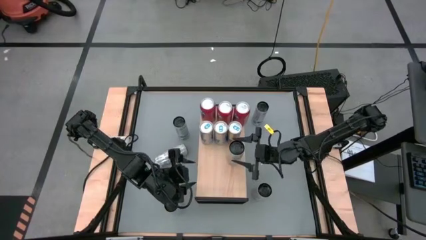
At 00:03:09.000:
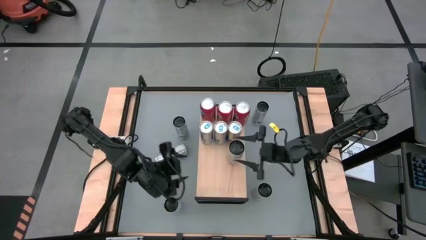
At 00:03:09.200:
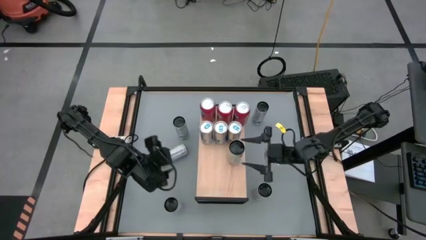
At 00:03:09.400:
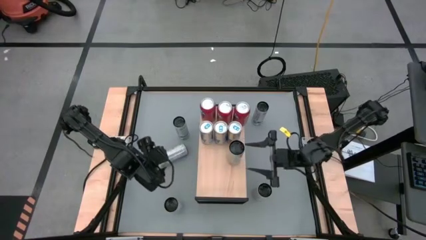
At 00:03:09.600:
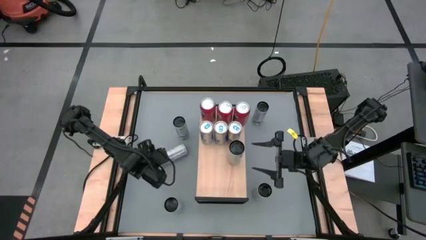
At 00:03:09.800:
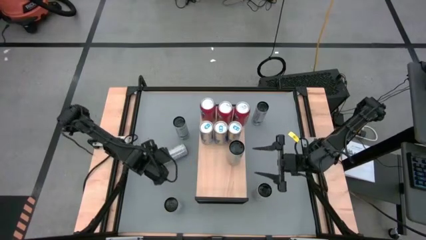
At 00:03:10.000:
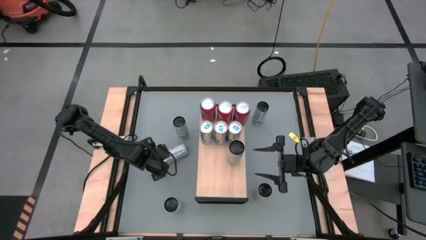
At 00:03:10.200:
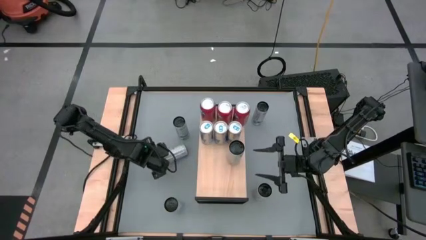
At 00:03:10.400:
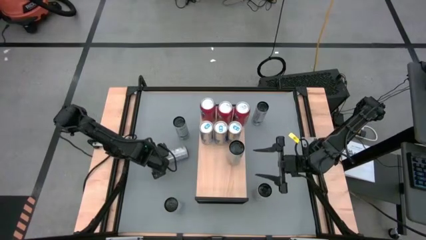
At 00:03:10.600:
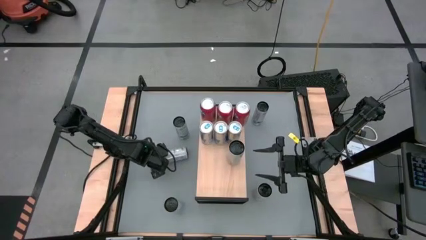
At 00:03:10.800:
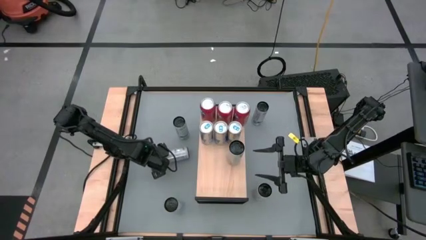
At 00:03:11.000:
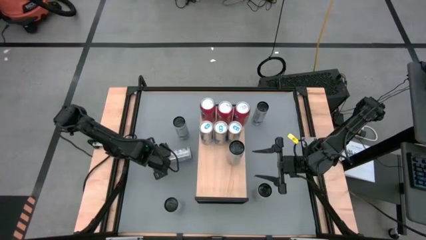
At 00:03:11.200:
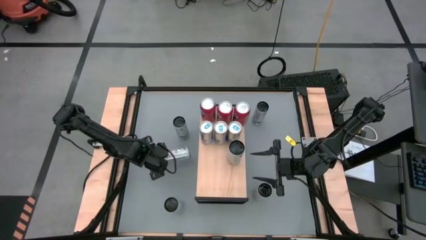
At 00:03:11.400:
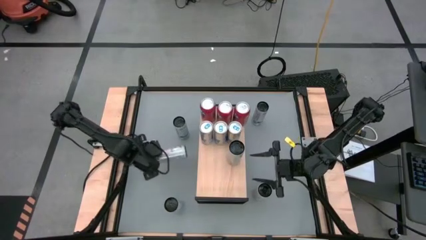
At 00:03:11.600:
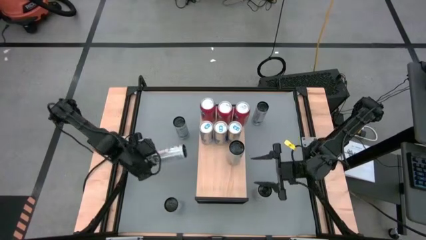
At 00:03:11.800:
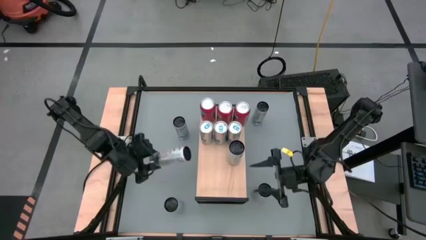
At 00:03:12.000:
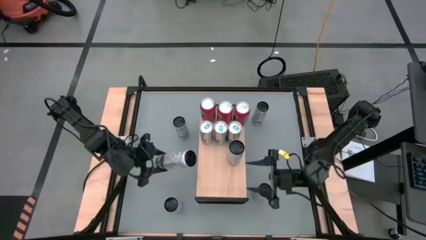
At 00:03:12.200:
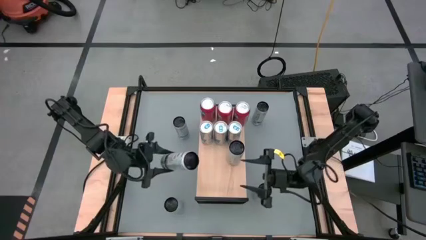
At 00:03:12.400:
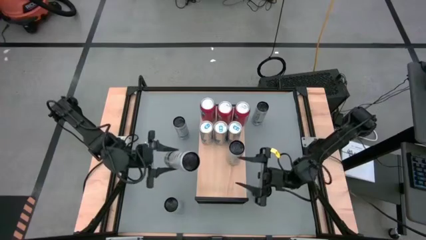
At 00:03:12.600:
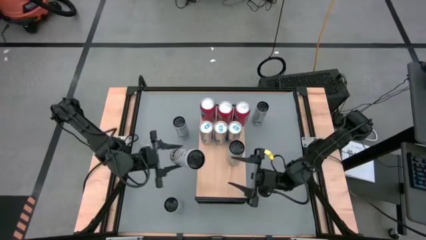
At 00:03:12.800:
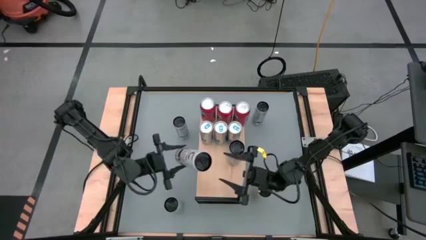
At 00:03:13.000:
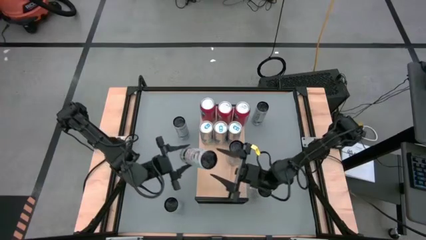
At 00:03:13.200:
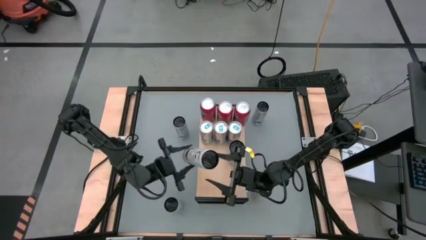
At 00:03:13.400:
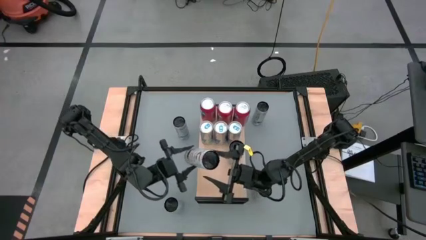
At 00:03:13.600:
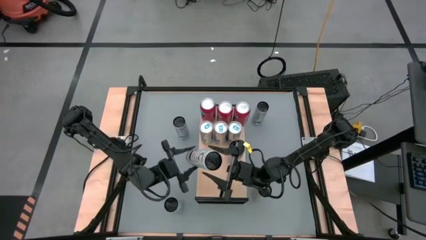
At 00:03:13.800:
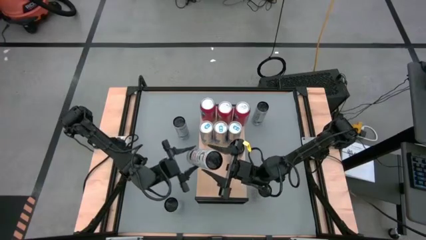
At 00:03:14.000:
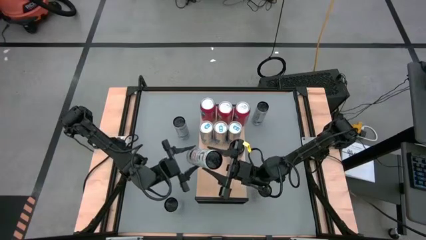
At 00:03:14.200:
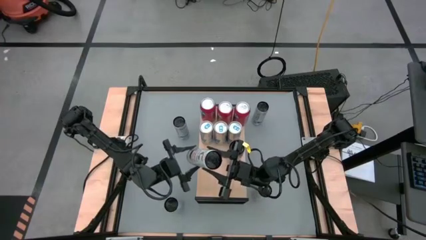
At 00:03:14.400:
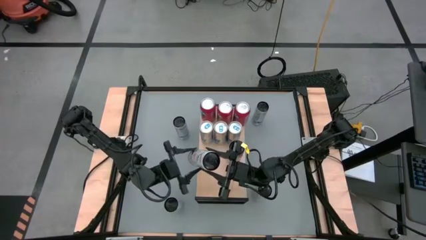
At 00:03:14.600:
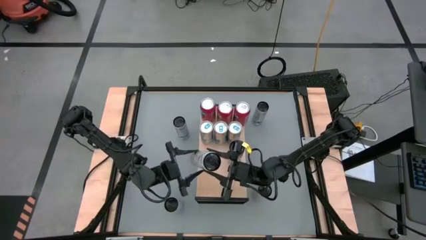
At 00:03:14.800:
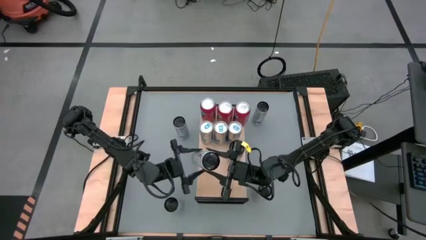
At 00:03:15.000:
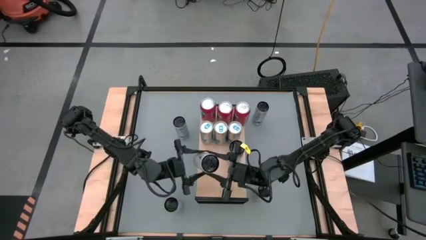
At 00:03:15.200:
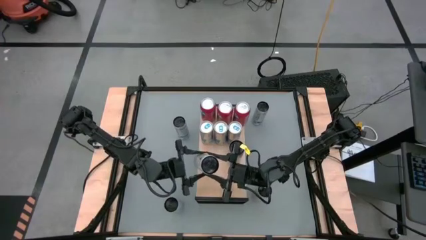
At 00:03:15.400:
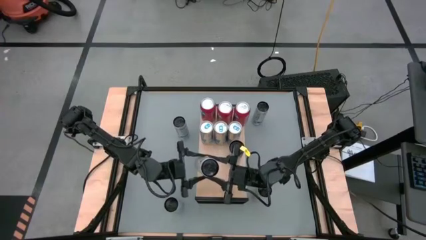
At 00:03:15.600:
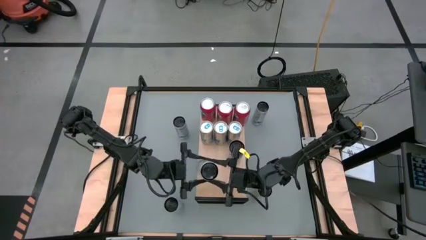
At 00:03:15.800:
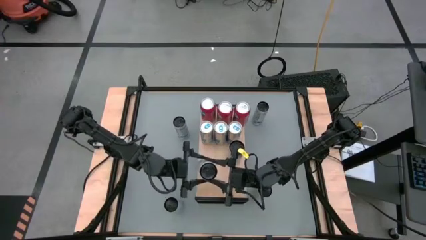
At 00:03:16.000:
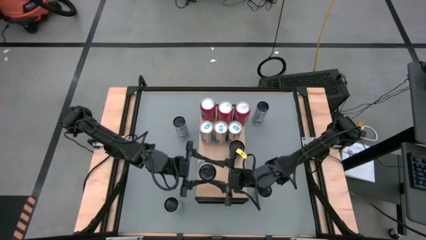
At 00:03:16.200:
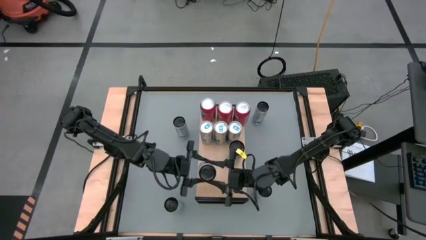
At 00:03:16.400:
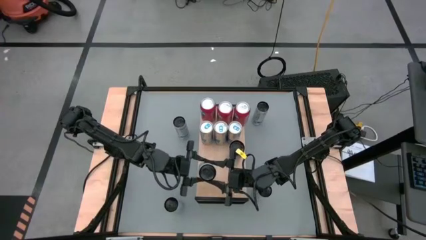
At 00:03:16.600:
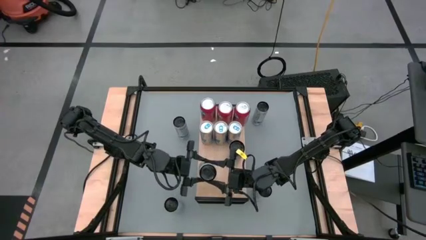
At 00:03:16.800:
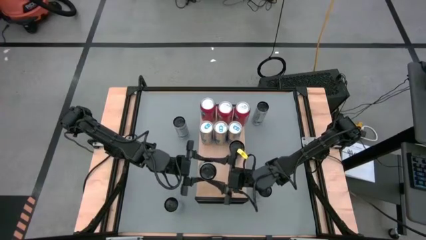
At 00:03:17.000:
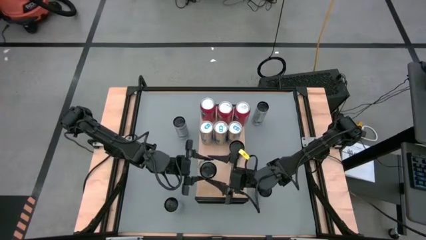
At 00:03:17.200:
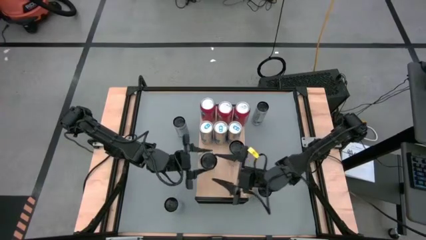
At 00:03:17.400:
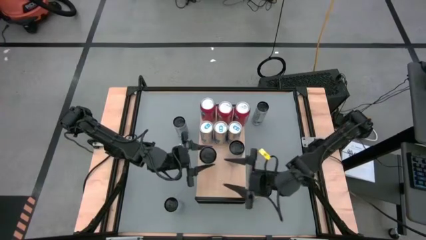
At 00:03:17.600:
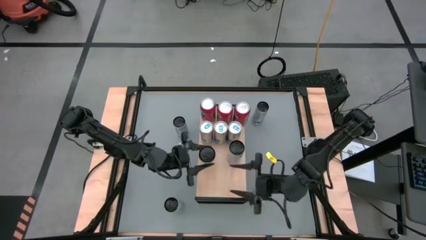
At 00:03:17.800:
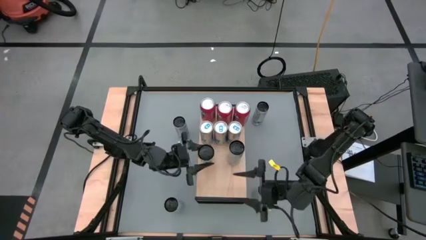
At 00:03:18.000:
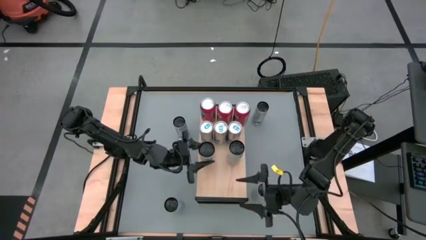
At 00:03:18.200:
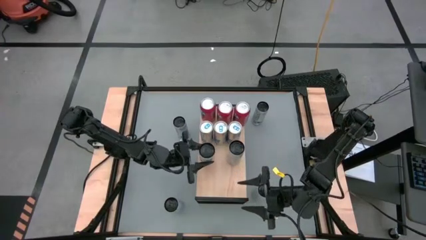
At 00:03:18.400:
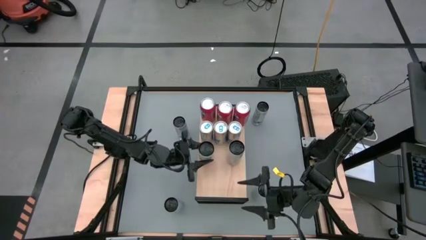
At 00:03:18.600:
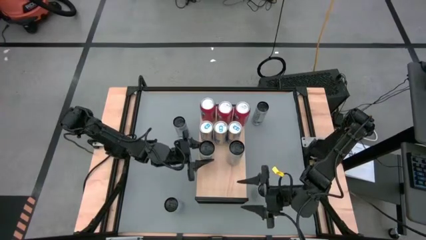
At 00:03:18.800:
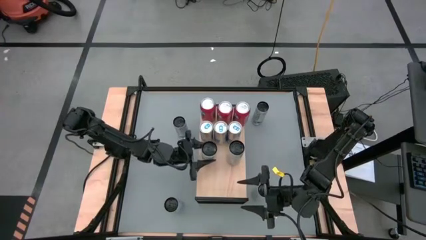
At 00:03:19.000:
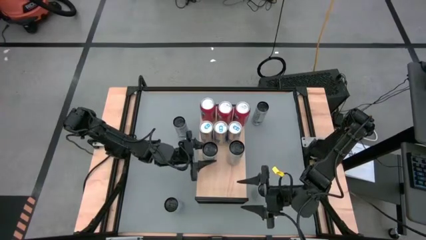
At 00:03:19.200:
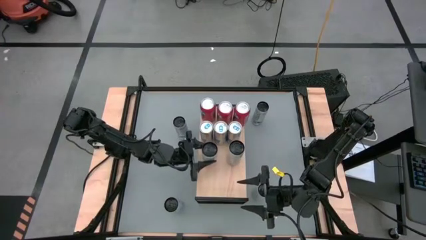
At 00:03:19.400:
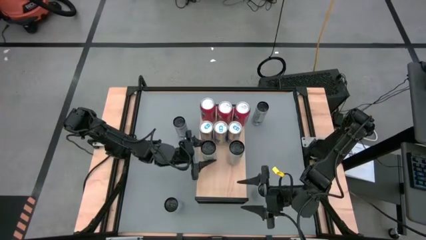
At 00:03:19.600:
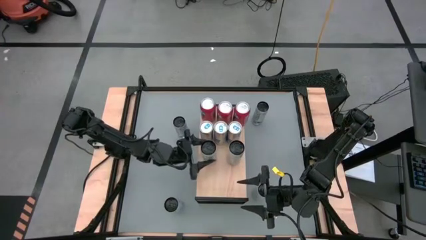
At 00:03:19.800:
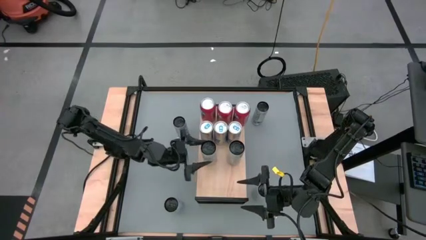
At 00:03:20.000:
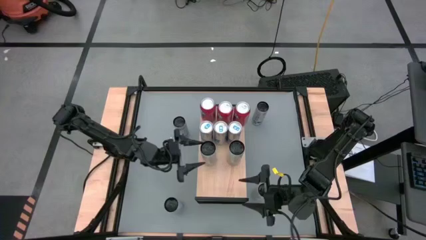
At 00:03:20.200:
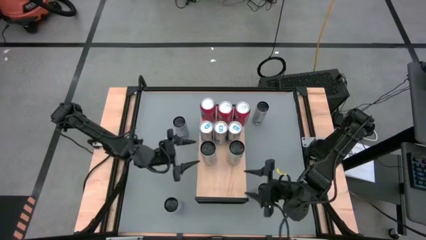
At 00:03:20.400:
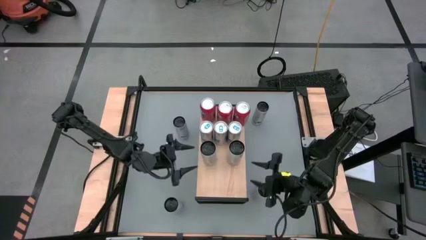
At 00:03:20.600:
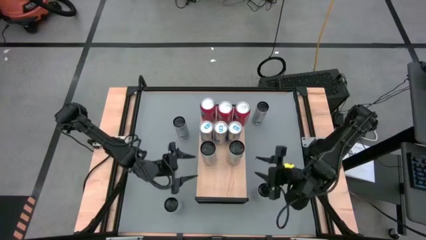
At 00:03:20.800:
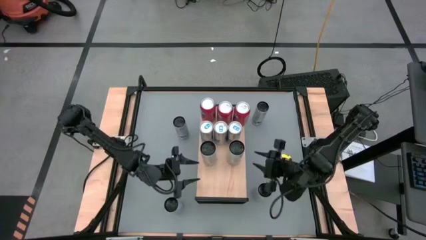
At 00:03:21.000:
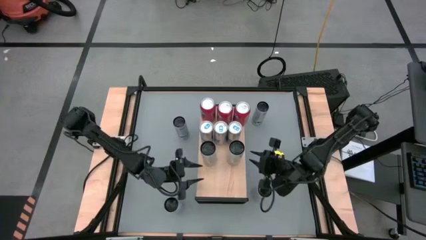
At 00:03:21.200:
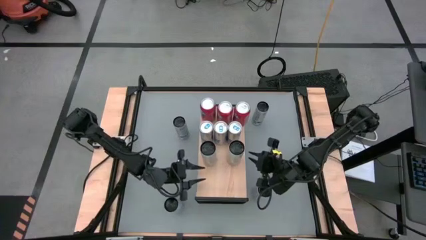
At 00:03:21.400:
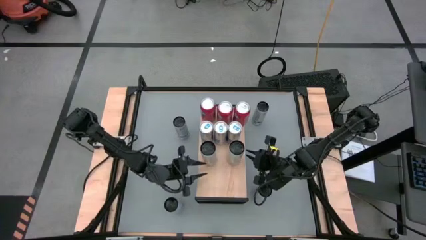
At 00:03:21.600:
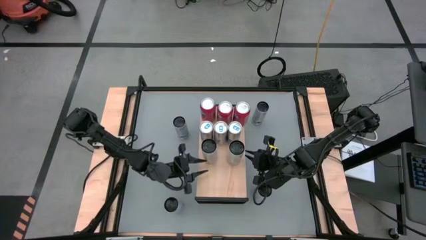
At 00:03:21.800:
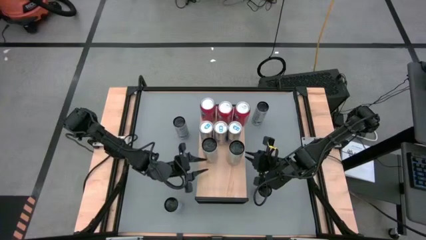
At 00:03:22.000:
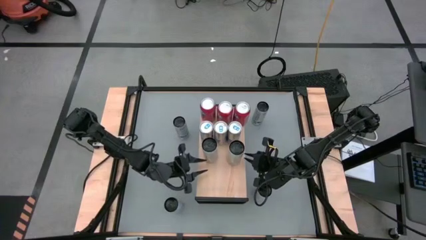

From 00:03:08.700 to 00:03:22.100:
Task: Place canned beverage on shelf
Put the middle left white soda can on the shelf aligned with the other blue soda can

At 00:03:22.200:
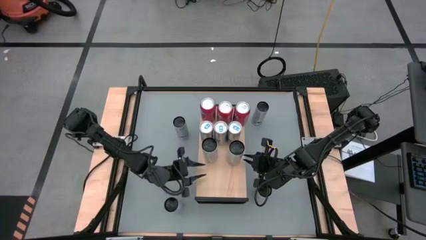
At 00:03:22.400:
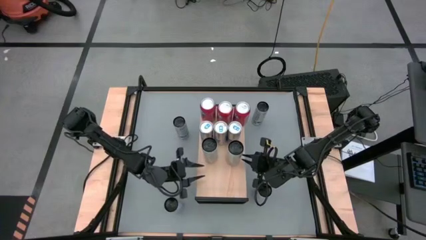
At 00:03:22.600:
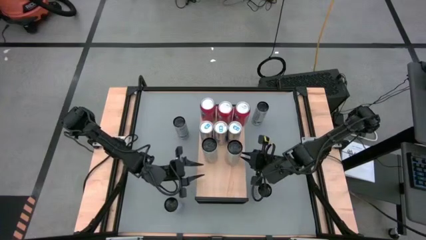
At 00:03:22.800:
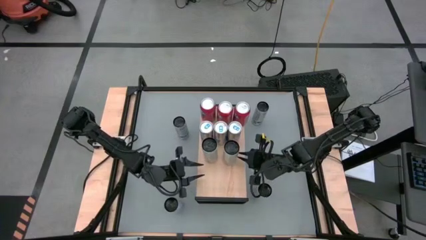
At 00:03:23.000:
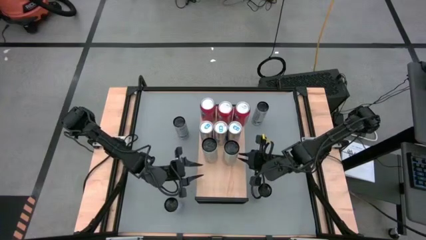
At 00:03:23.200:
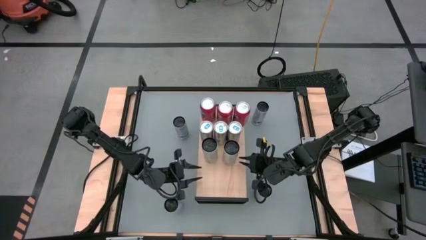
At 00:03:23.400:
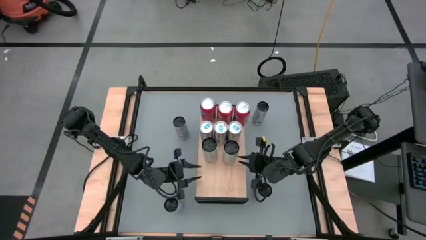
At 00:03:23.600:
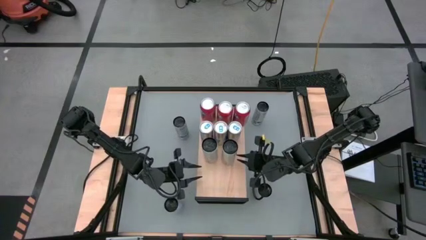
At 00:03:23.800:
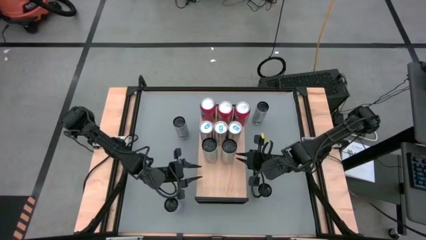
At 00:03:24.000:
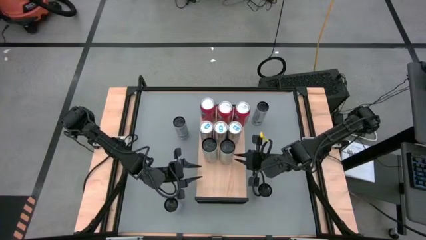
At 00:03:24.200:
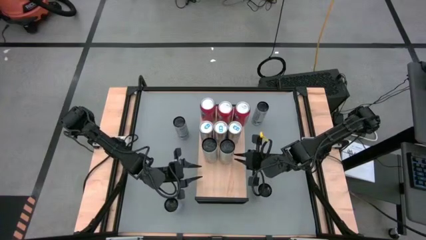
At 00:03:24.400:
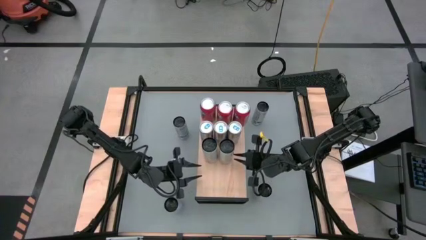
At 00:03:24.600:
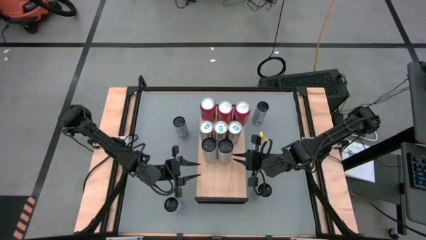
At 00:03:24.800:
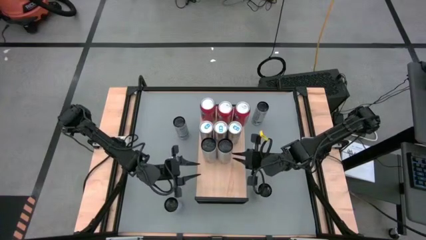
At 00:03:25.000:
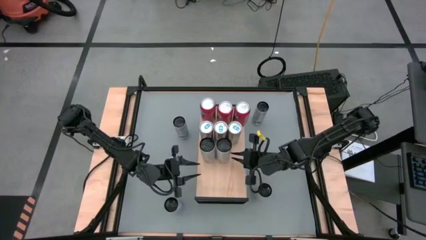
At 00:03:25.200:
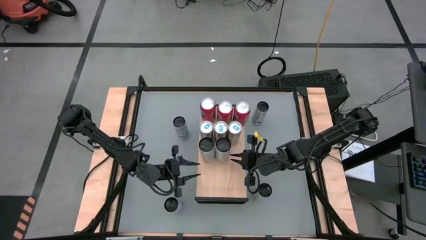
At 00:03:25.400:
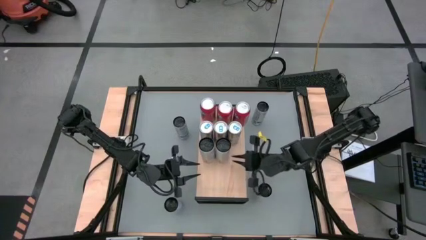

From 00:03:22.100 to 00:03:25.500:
Adjust the white soda on the shelf
